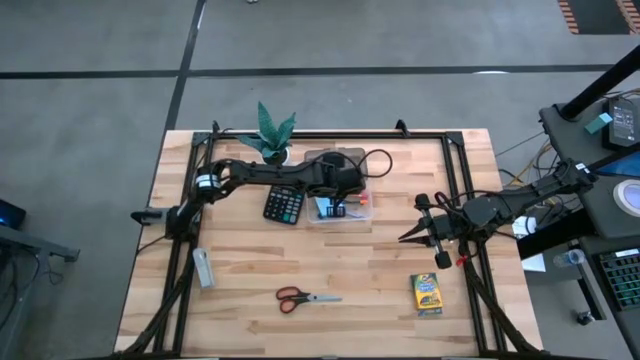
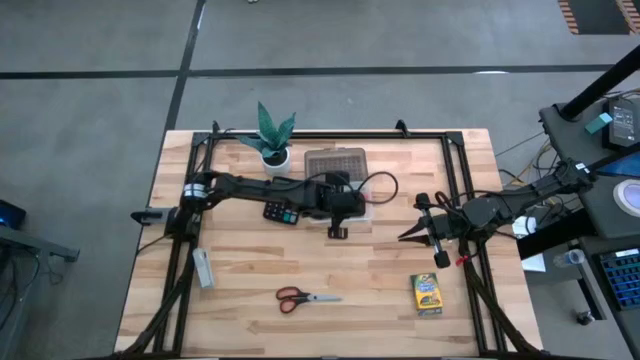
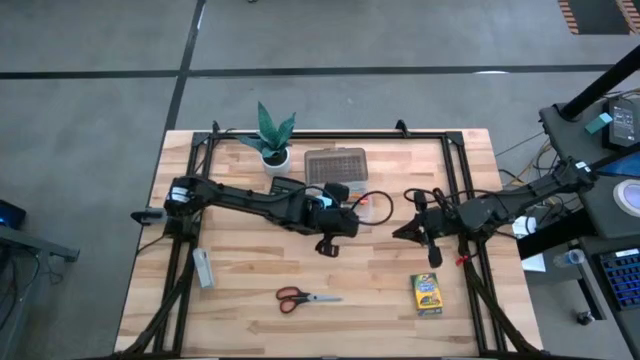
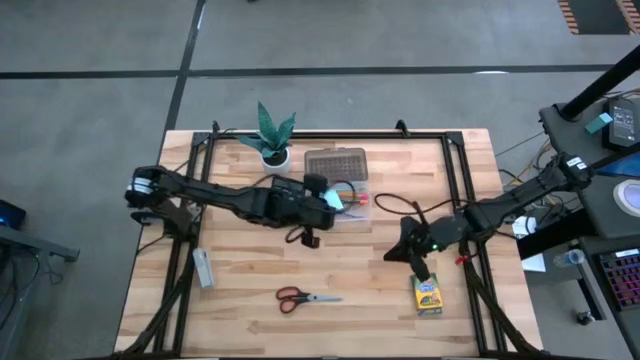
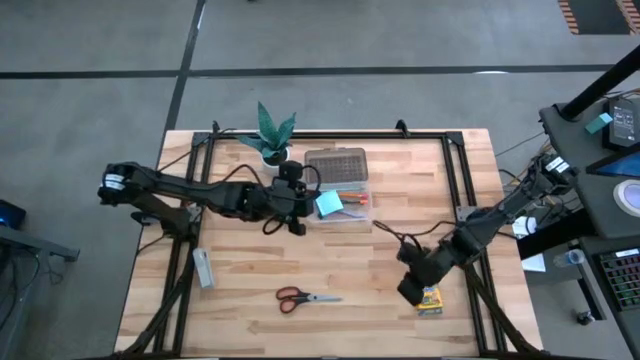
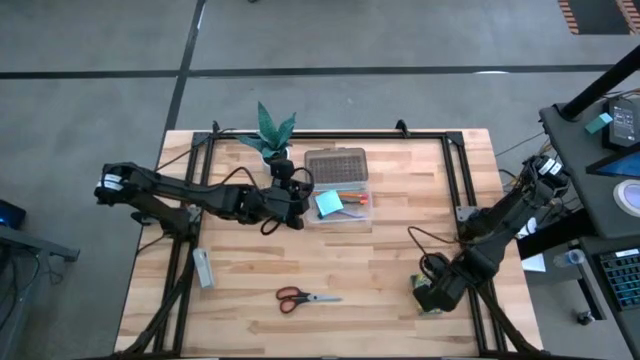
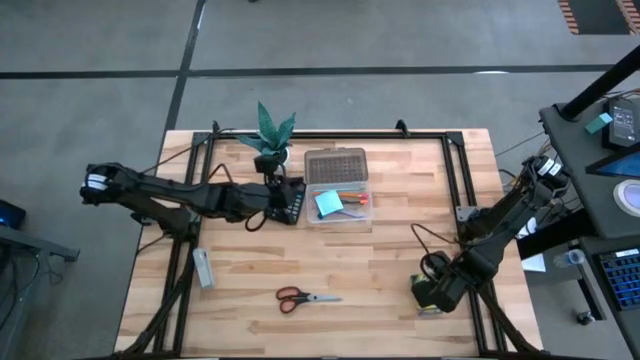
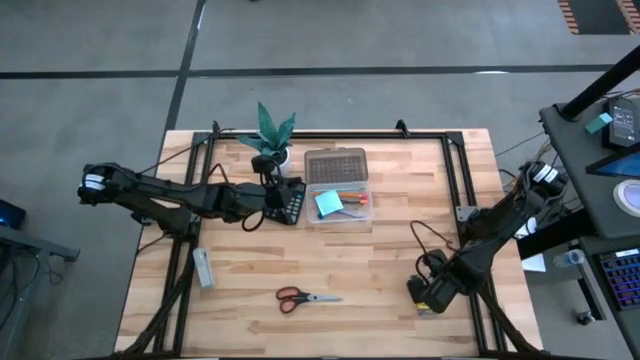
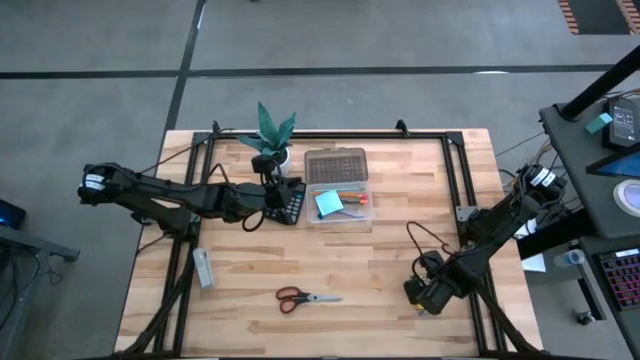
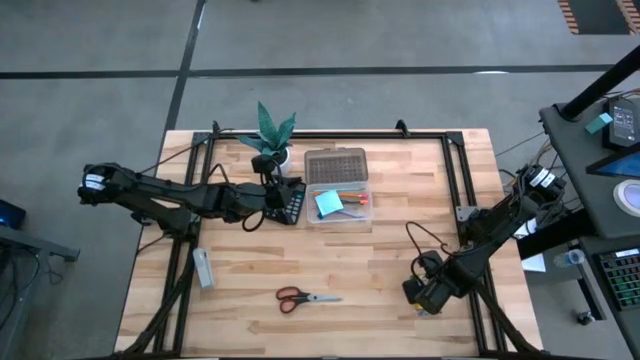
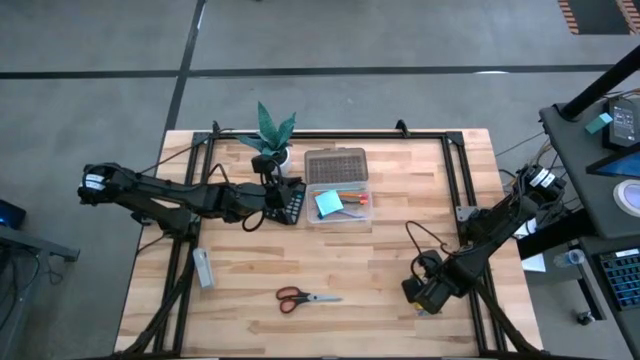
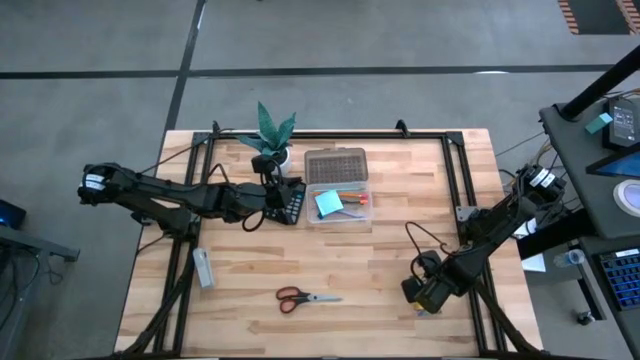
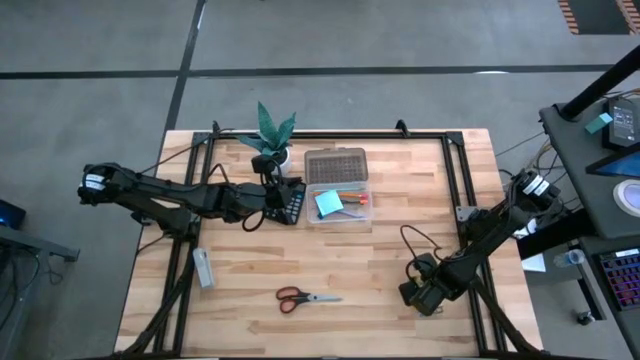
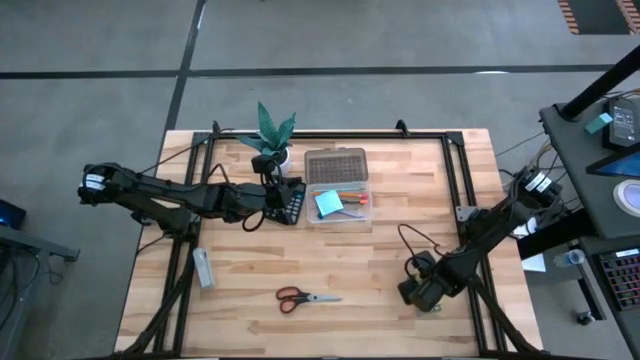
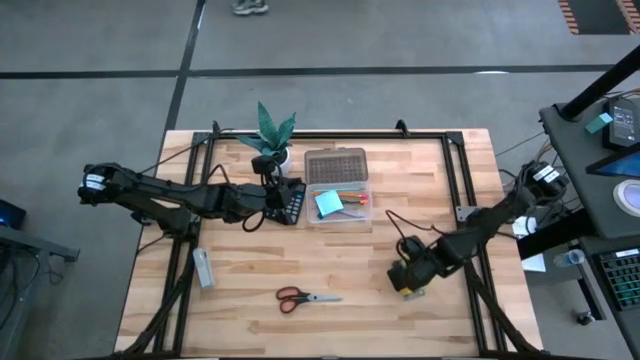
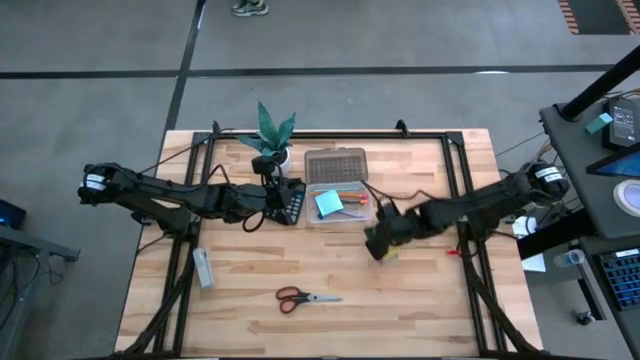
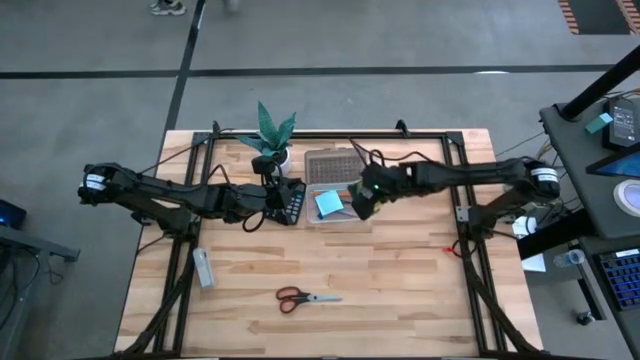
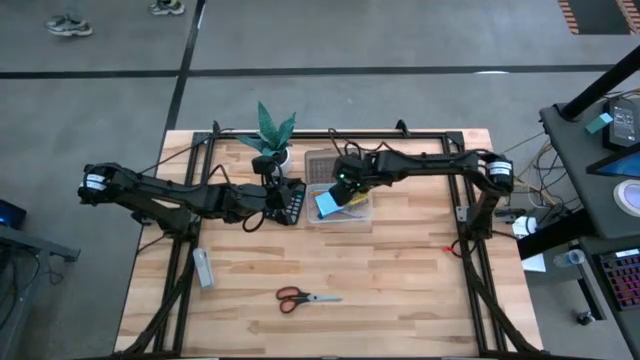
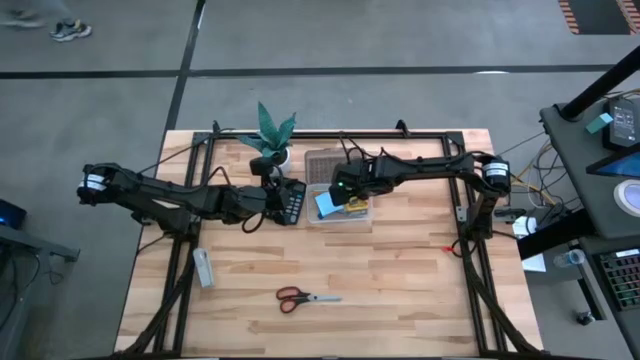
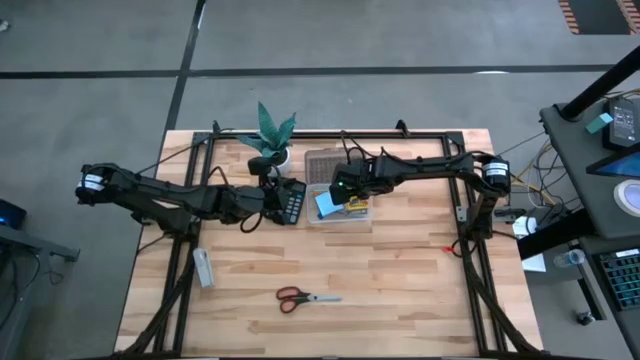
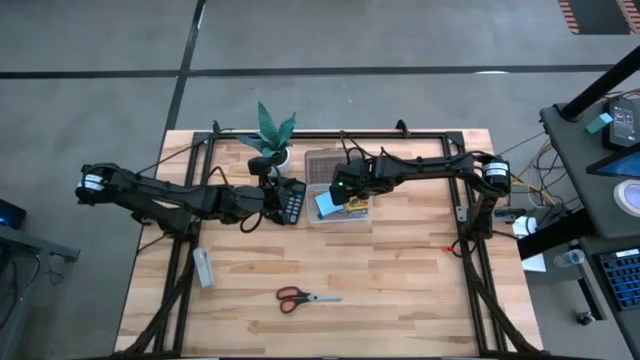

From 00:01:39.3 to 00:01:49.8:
Task: Pack school essentials
Put the crayons into the storage container

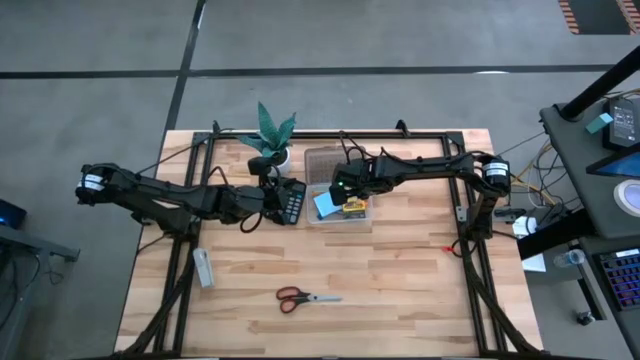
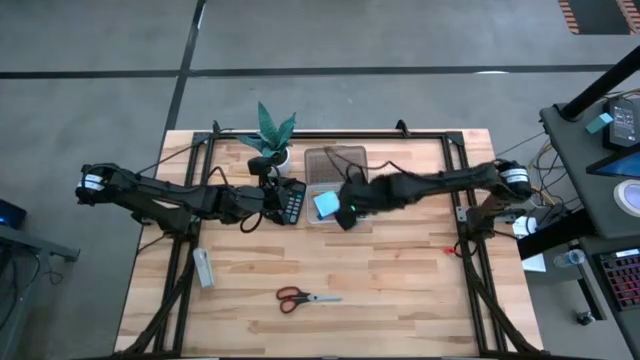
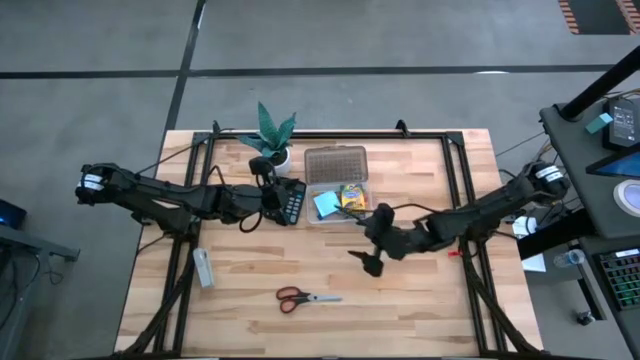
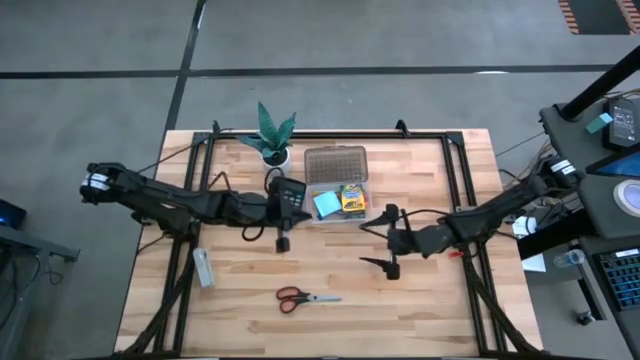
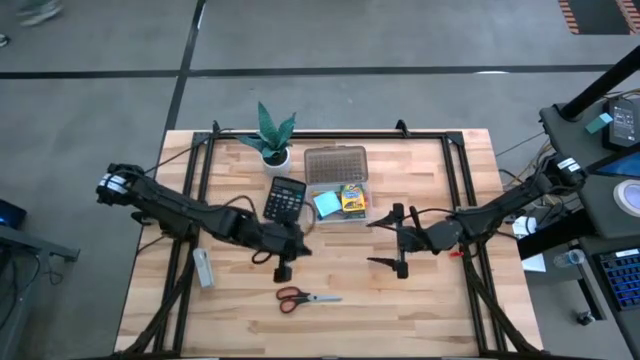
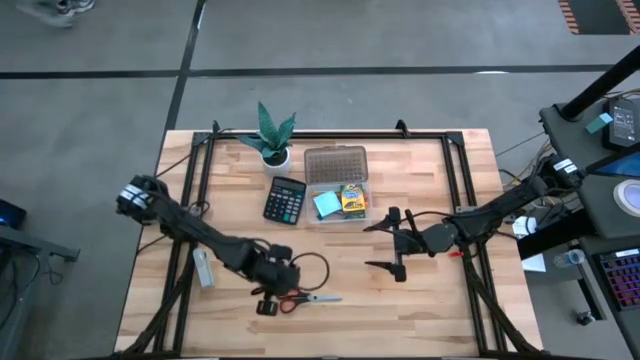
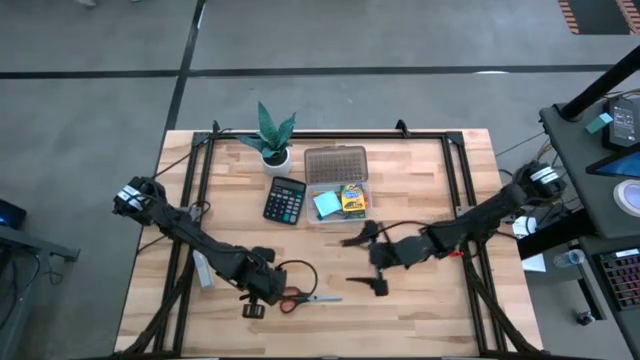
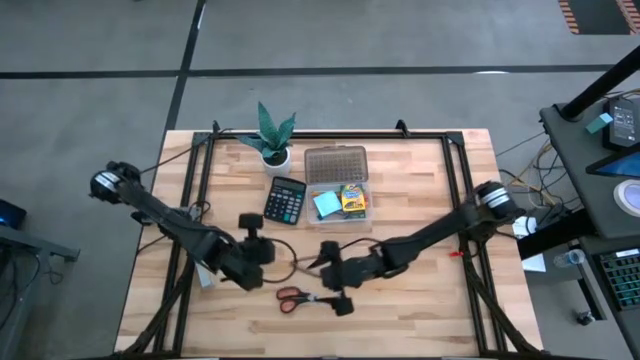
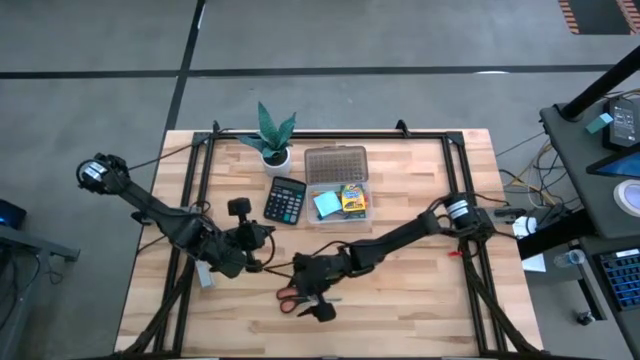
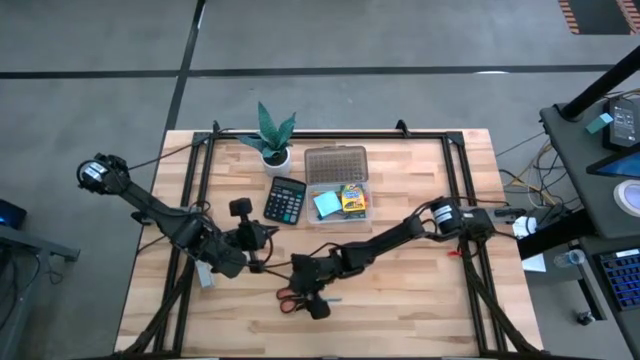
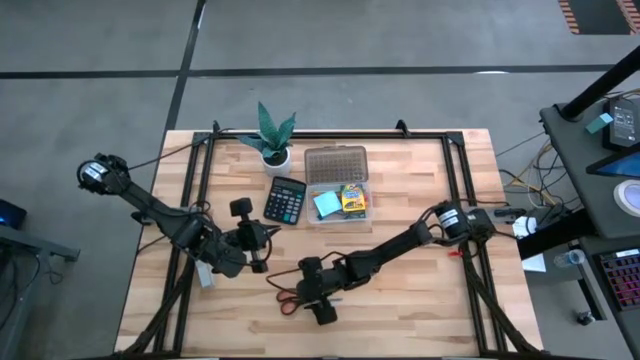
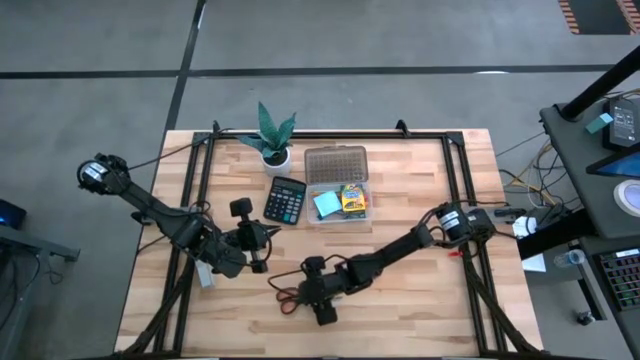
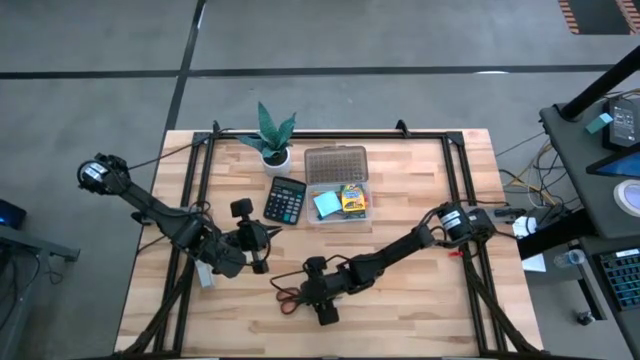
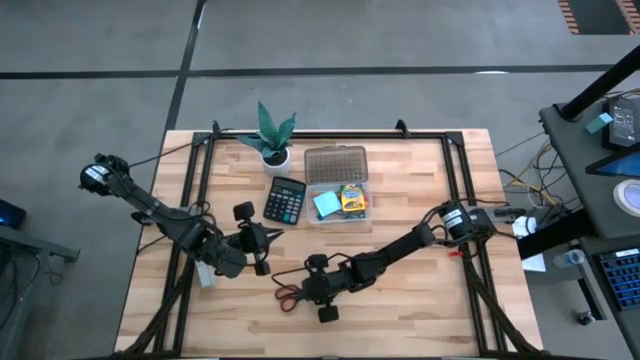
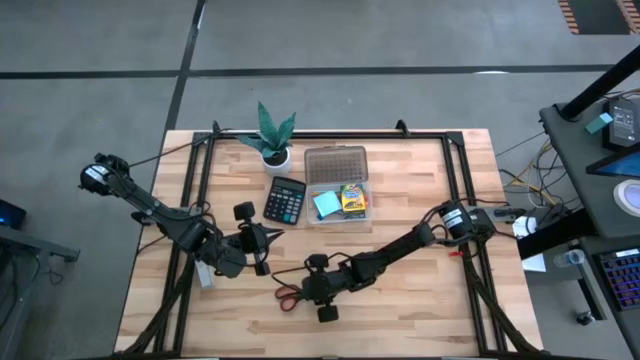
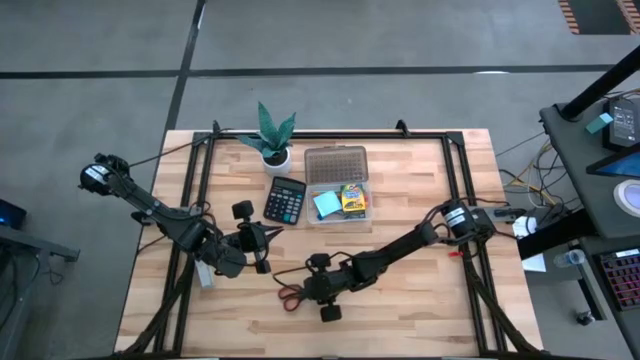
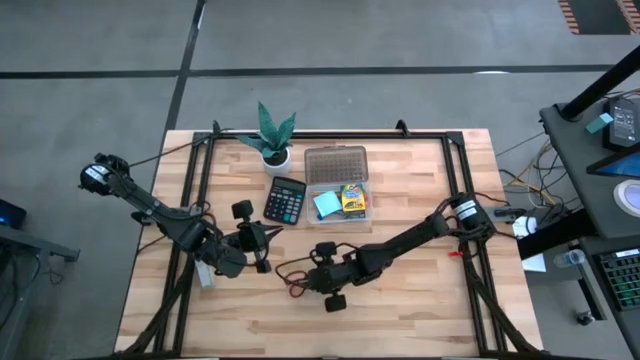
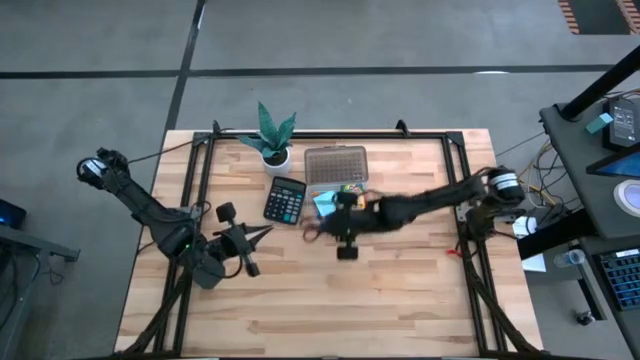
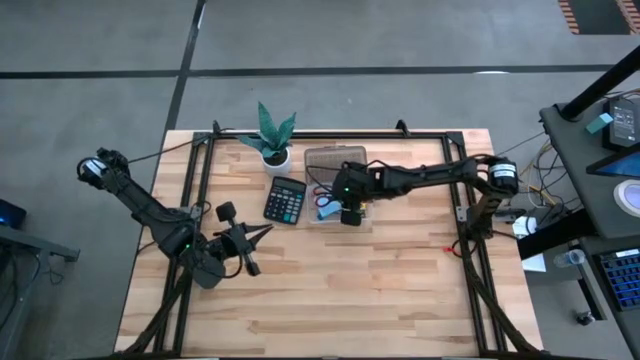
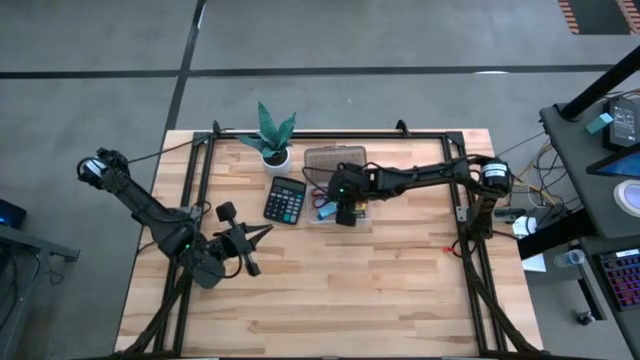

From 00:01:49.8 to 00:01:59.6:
Put the scissor into the supplies box
